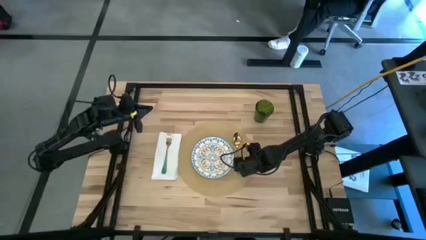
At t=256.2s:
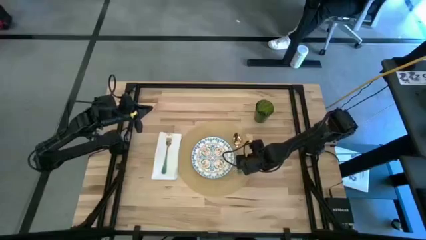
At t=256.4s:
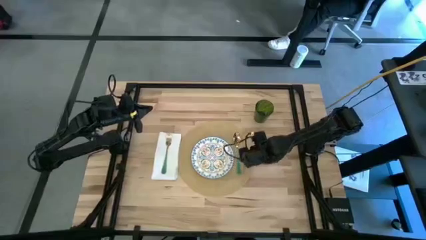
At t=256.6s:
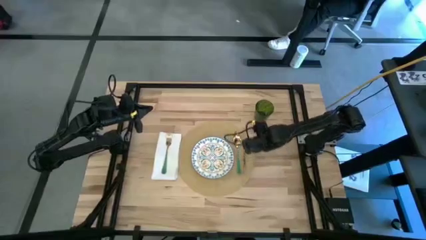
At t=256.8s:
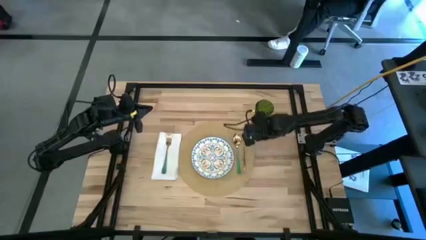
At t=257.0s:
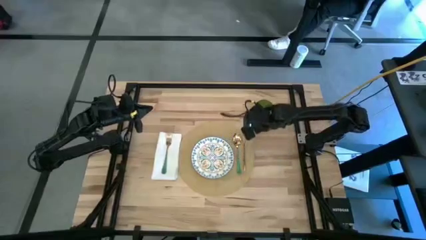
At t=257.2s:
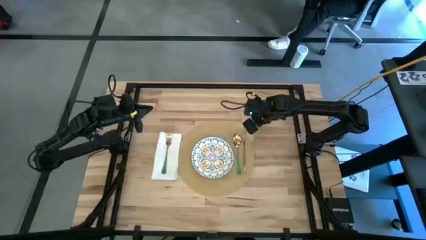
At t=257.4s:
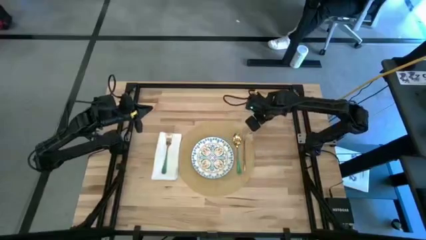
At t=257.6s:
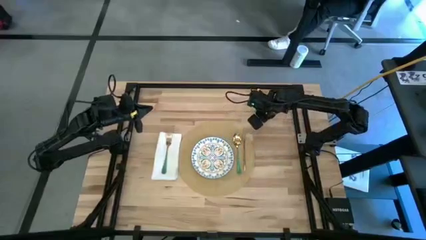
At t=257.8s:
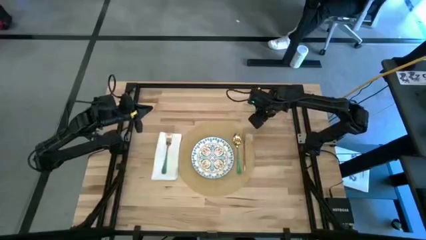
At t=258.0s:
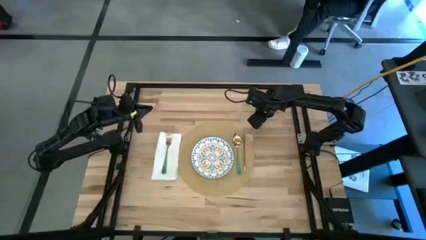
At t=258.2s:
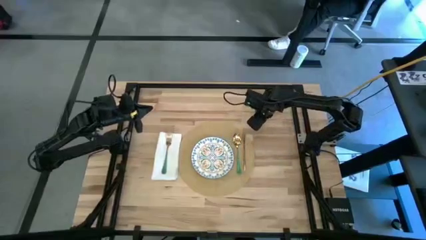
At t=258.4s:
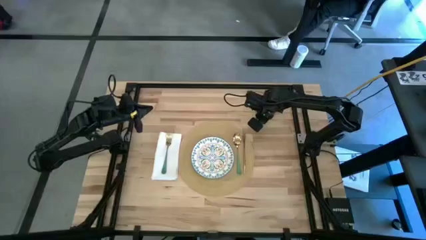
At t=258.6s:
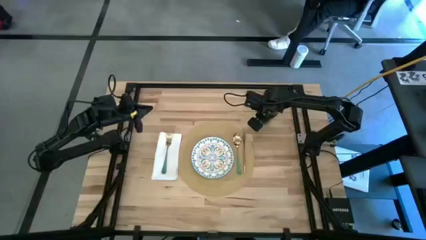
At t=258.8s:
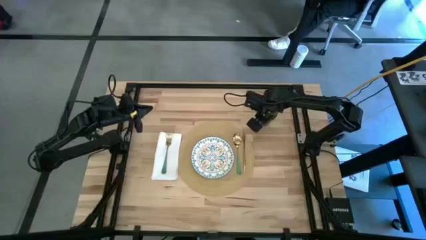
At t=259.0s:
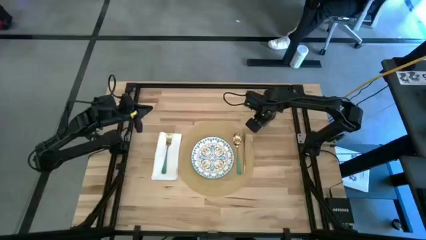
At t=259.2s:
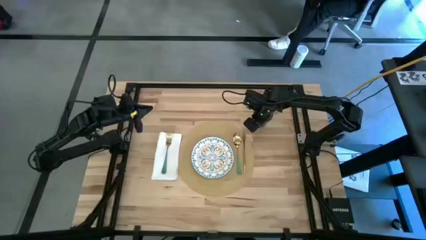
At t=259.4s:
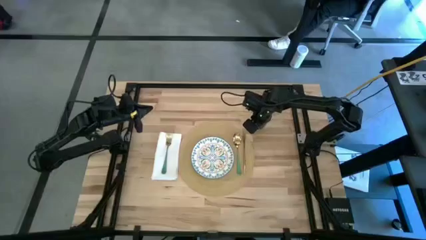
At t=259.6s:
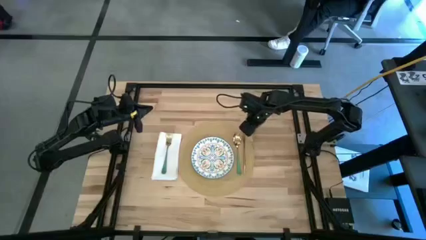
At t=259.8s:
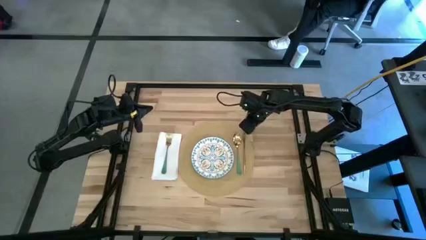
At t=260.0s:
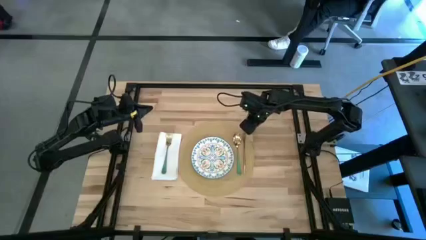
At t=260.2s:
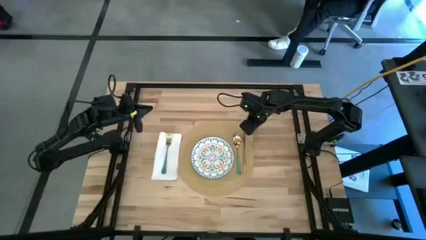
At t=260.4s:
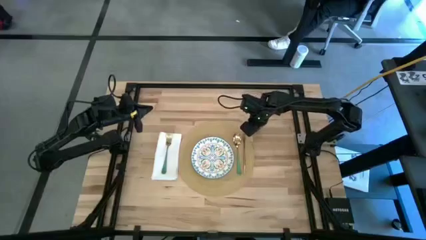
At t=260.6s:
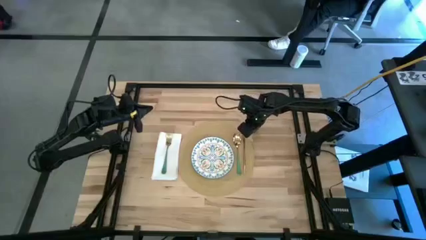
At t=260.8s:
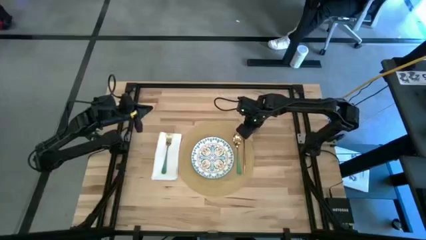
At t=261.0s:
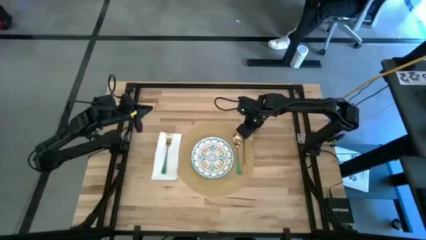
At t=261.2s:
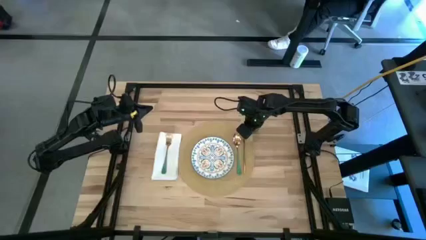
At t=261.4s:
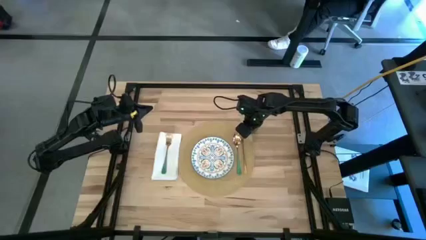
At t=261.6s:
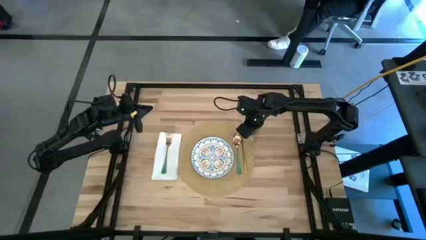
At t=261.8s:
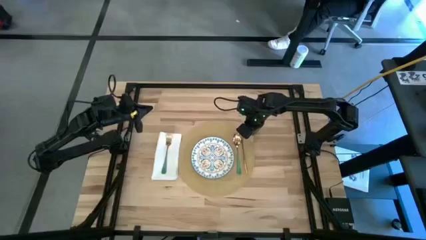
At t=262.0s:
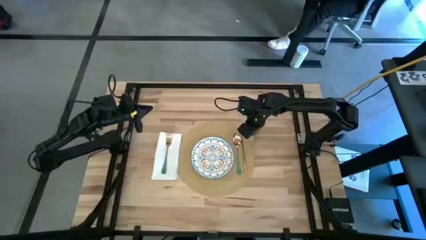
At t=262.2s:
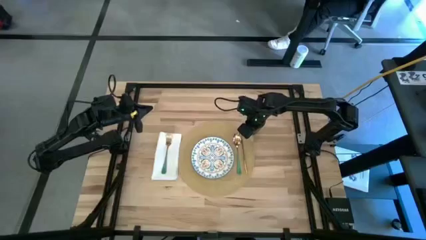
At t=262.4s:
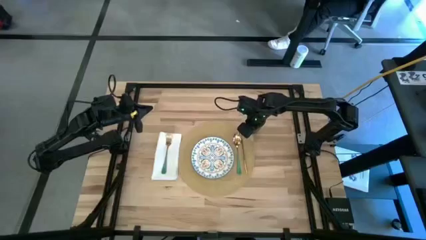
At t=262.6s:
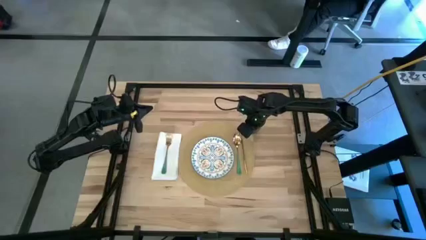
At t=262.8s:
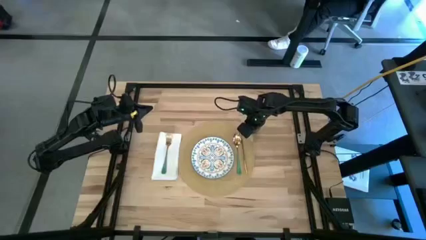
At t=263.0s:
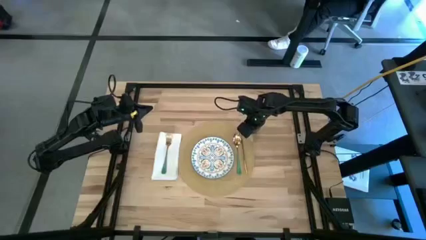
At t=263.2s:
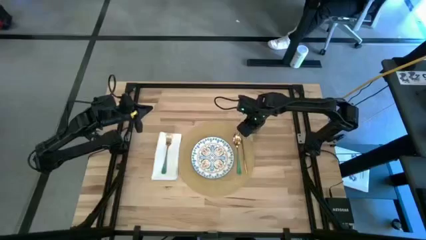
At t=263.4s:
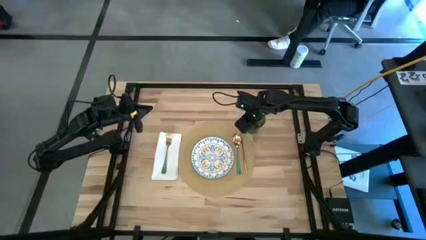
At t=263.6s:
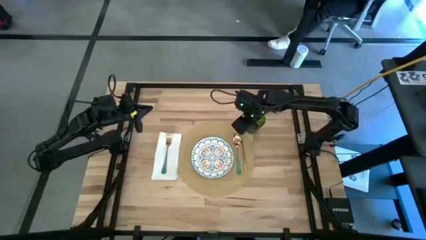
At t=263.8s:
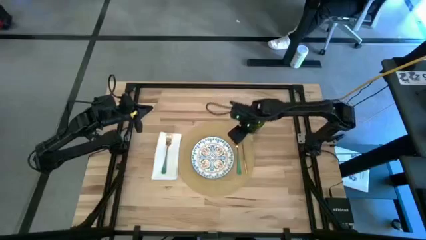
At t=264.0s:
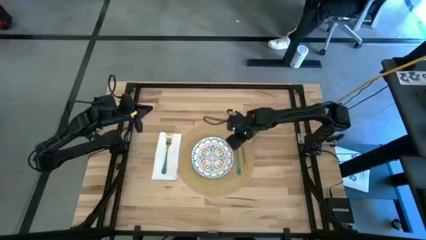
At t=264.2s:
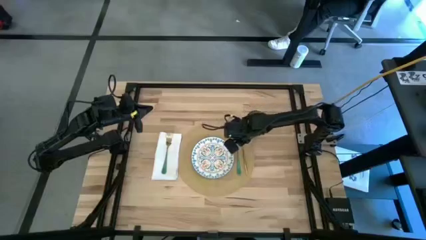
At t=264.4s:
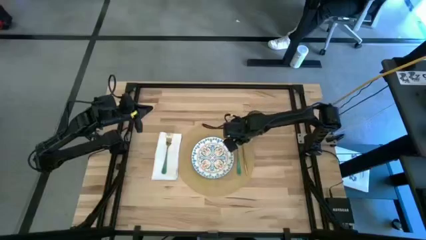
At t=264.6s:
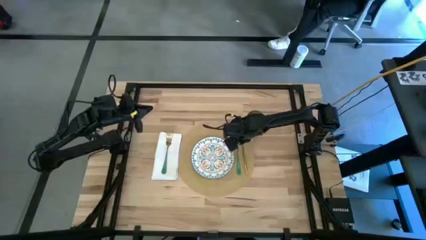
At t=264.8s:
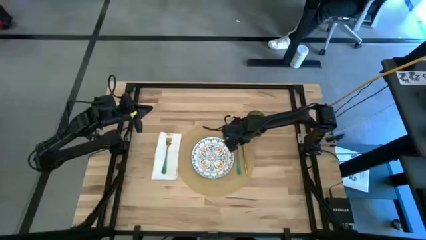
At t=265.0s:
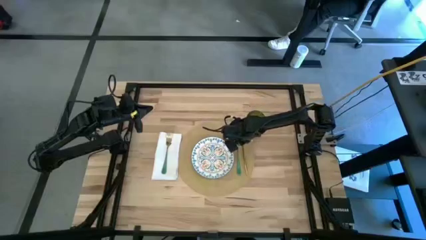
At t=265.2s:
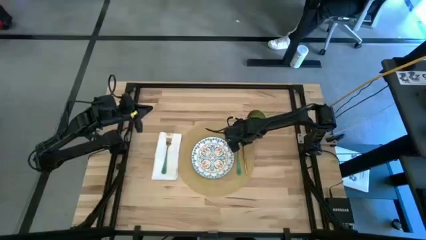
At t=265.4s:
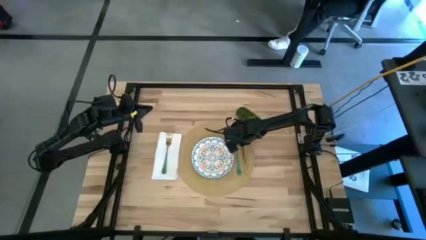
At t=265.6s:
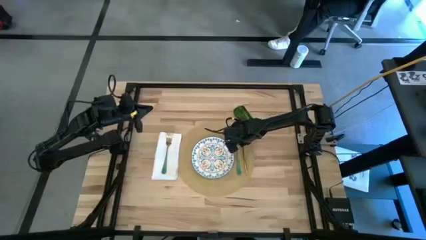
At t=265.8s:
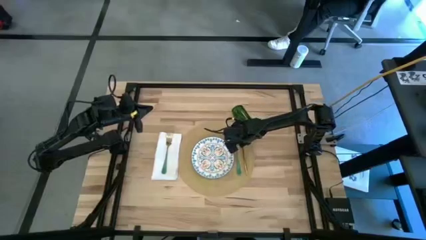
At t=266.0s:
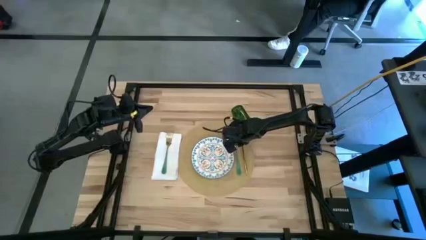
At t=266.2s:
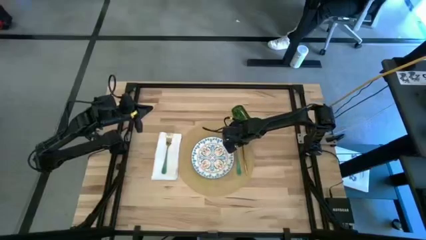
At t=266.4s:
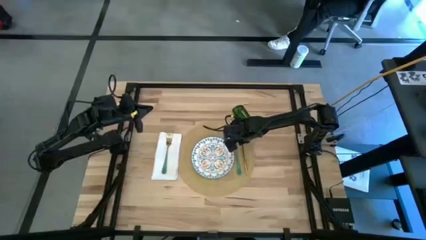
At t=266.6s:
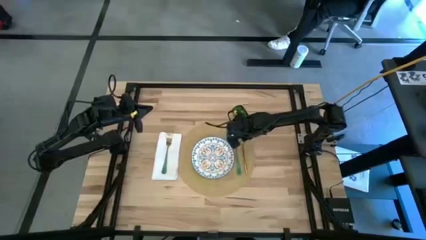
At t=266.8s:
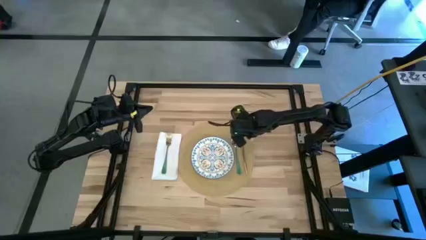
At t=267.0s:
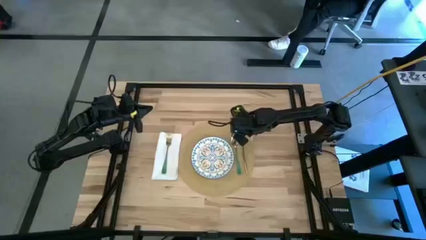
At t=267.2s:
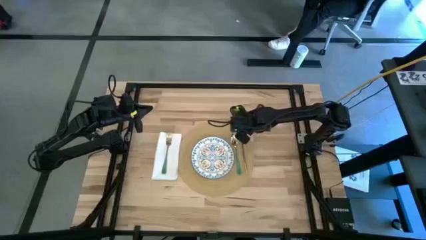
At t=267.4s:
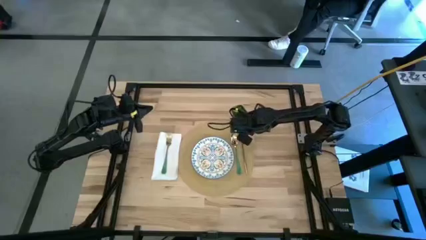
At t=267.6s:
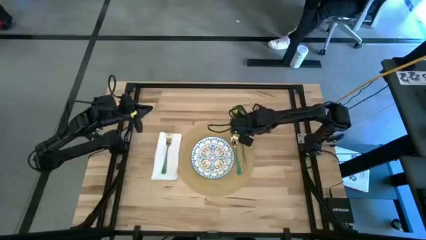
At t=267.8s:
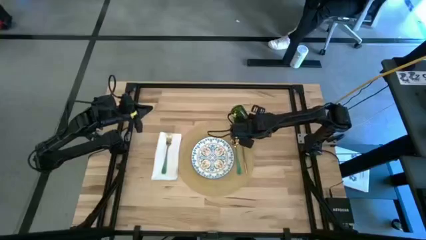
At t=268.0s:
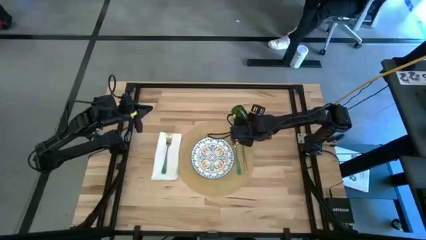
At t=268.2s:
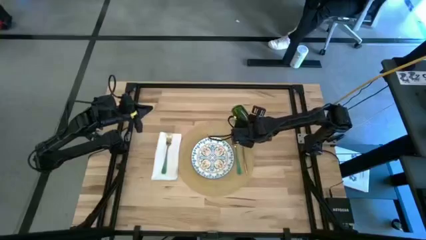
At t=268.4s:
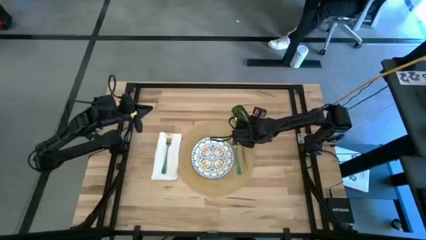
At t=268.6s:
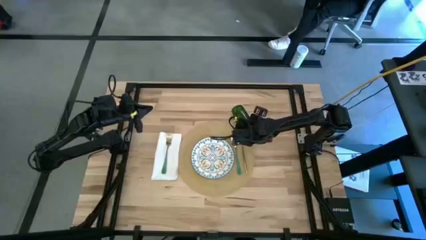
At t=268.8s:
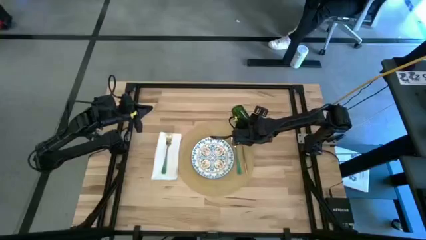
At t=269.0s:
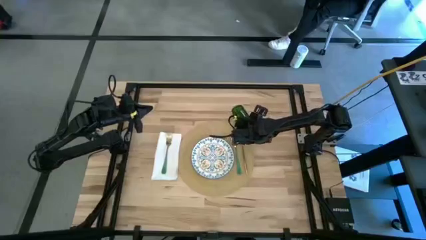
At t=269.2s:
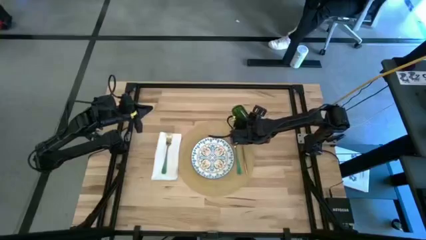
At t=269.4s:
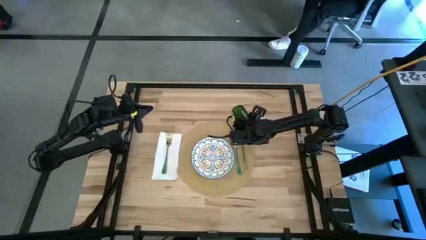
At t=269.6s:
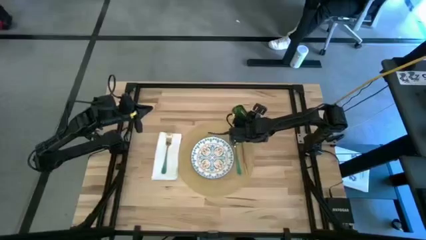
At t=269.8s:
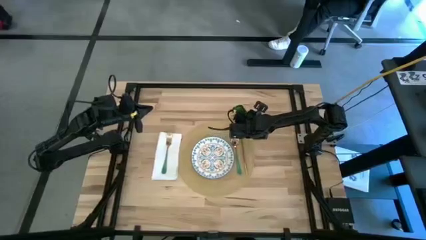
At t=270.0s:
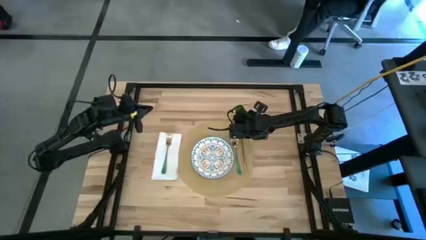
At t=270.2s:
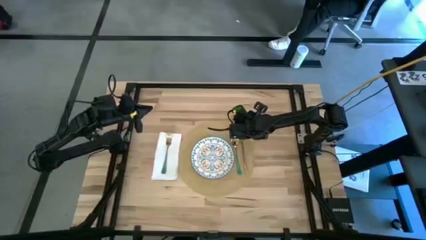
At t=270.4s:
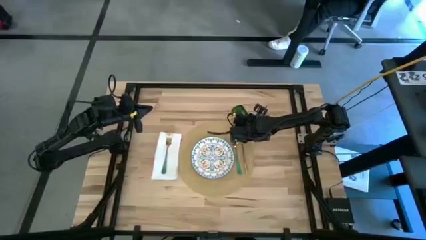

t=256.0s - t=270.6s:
Task: Set table place
Adjust the green cup
